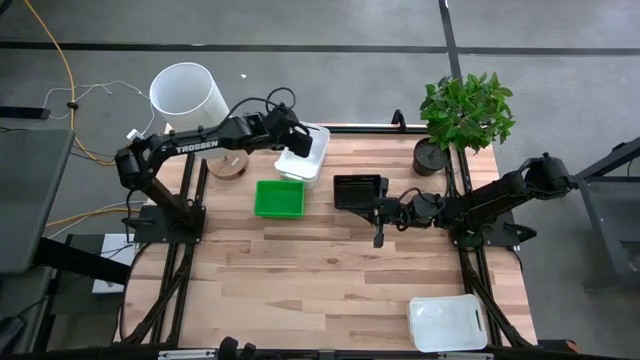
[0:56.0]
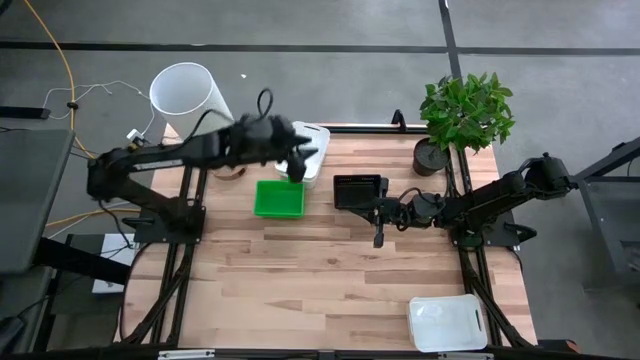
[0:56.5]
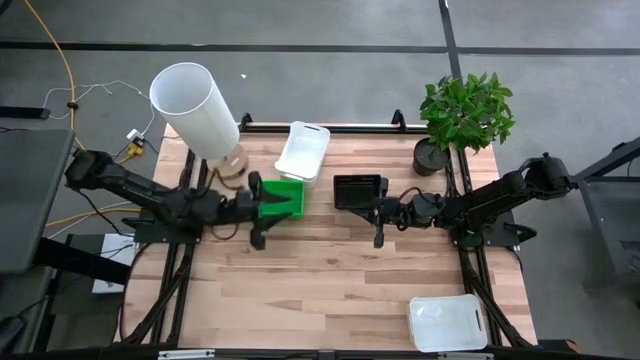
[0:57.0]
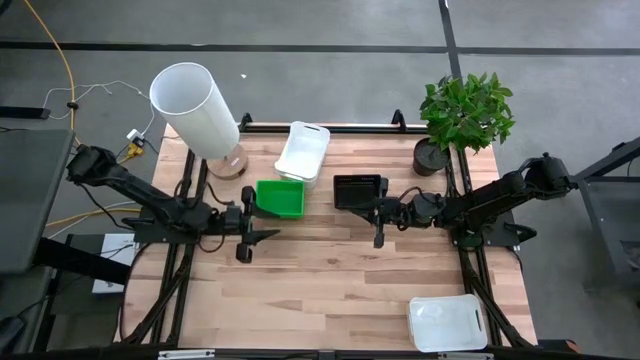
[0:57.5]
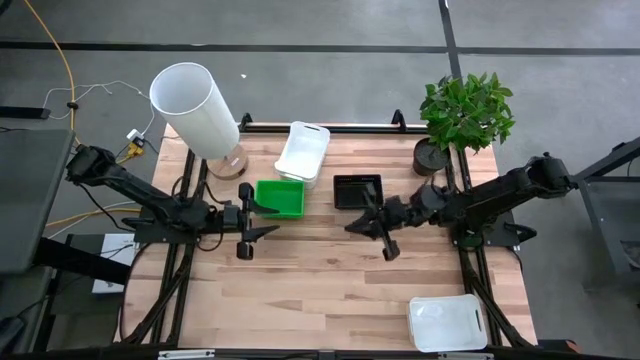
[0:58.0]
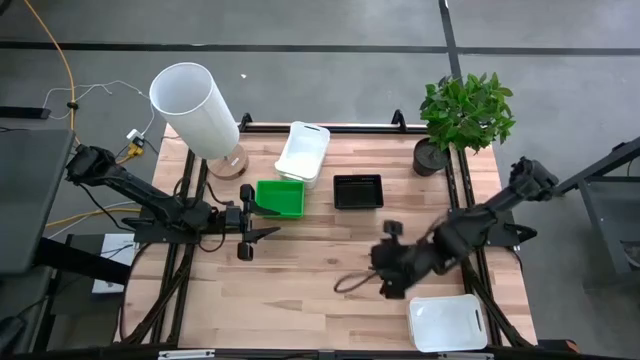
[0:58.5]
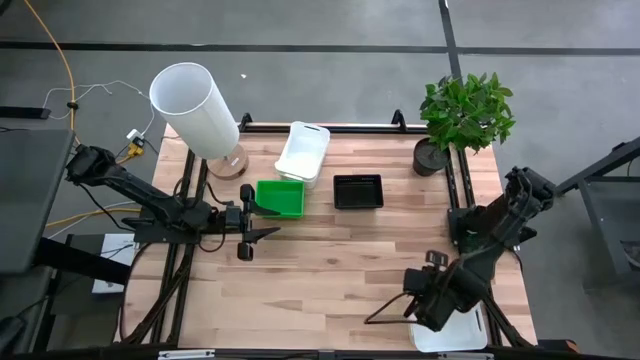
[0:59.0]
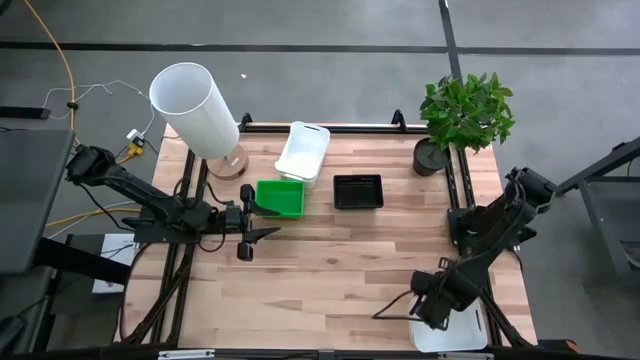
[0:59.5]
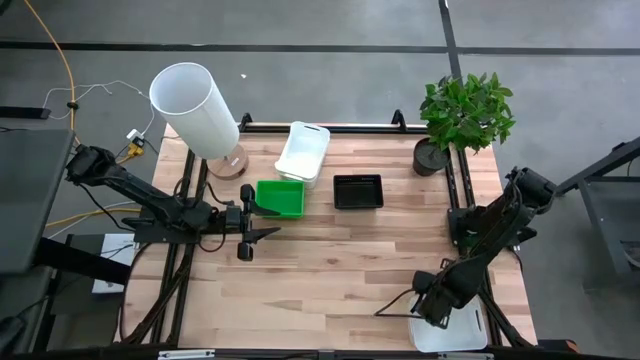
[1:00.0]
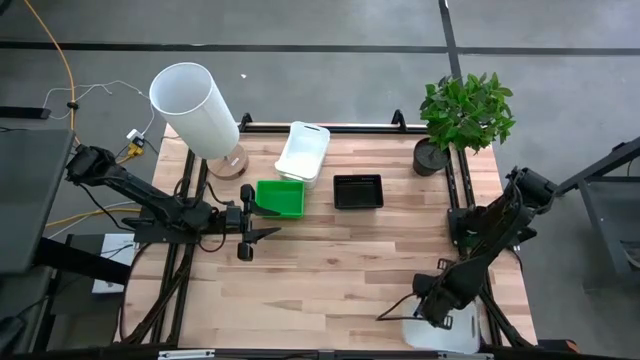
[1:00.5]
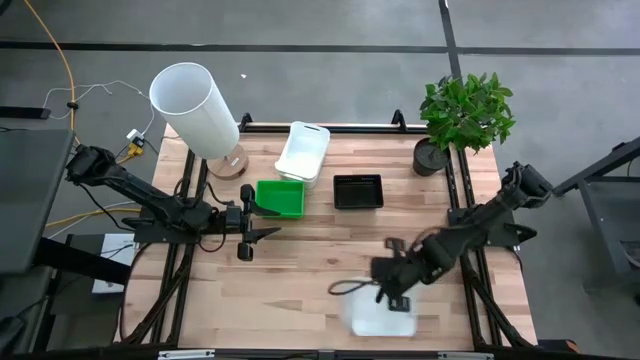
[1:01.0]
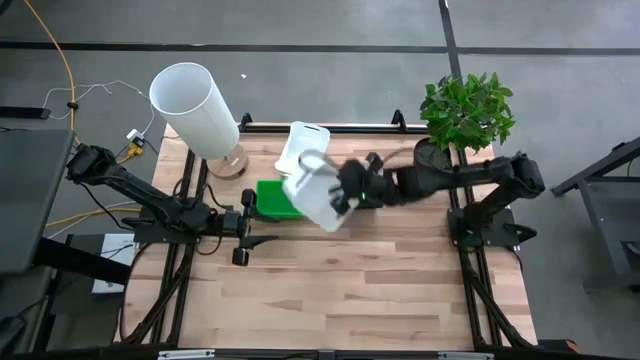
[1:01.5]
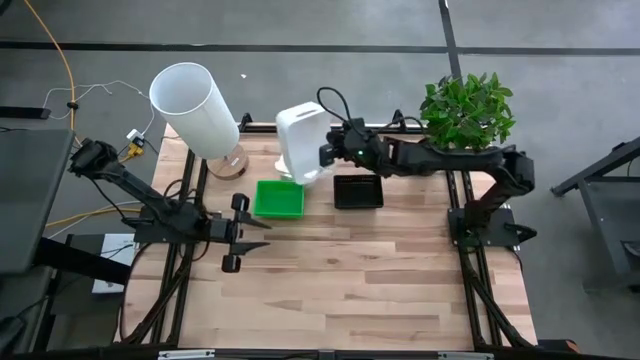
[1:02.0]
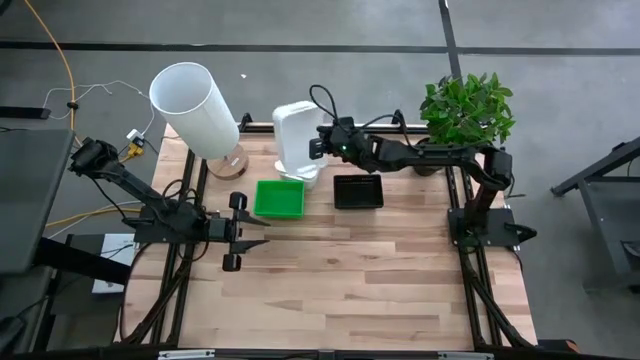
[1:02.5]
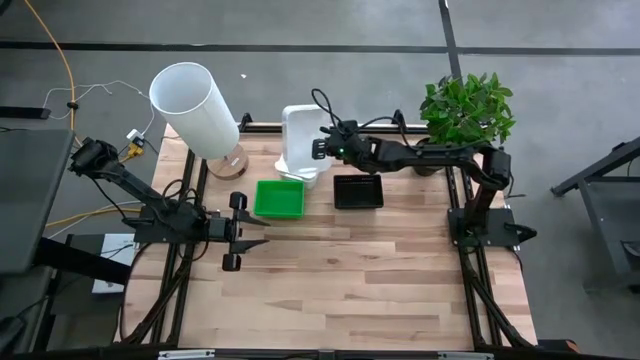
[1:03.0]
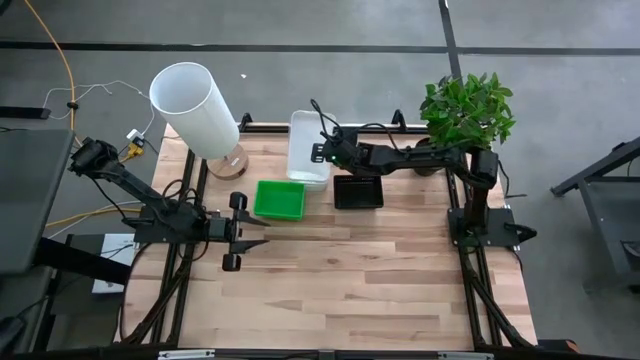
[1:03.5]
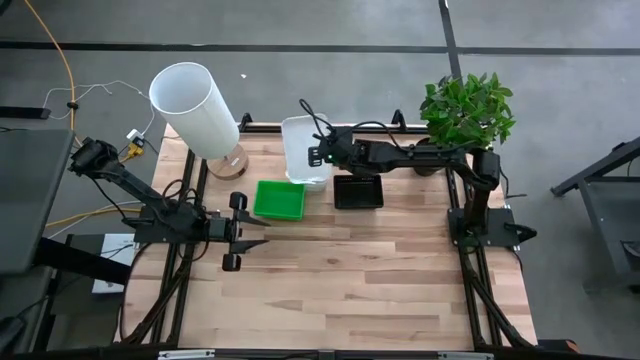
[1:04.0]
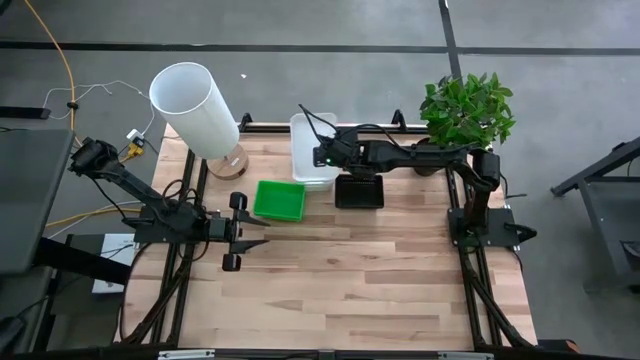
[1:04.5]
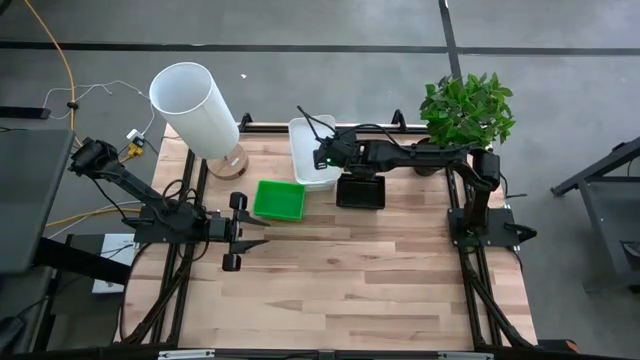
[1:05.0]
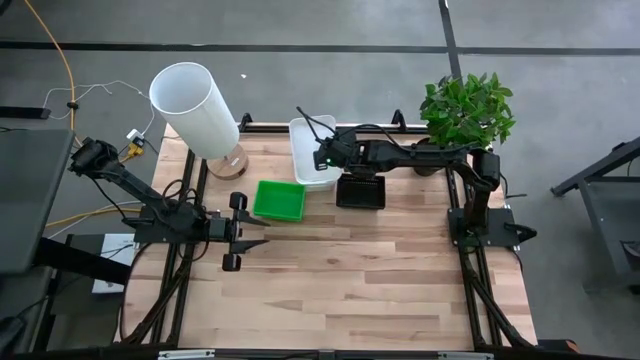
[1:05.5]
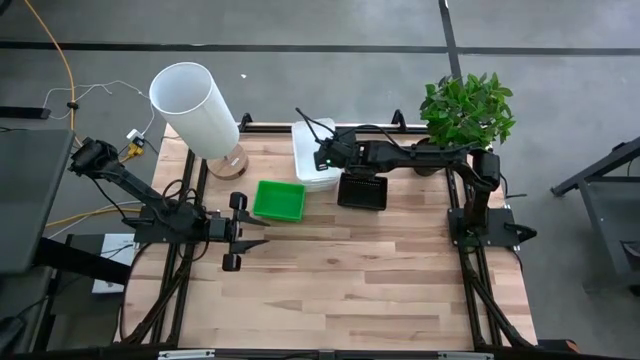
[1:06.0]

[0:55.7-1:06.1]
Stack the bottom white bin on the white bin

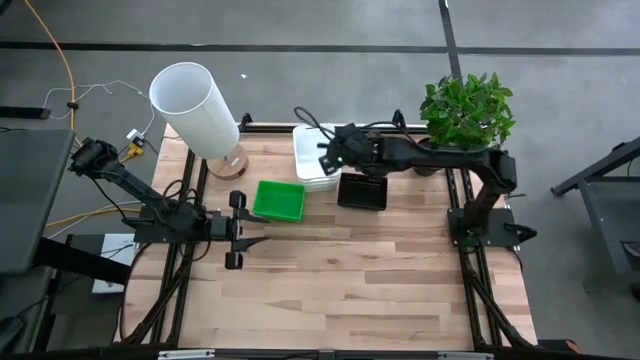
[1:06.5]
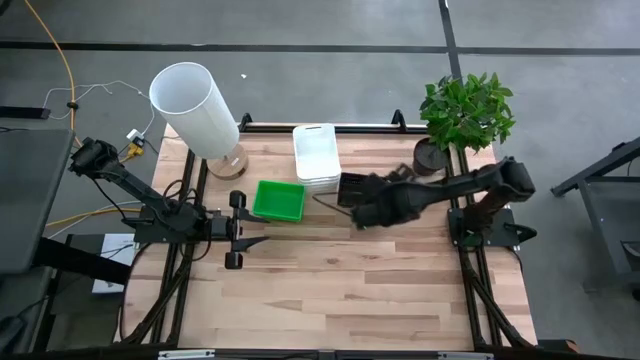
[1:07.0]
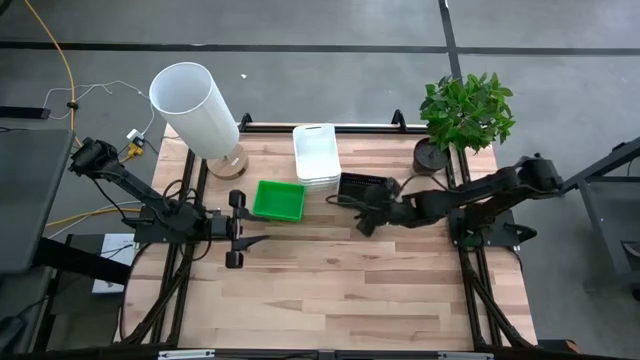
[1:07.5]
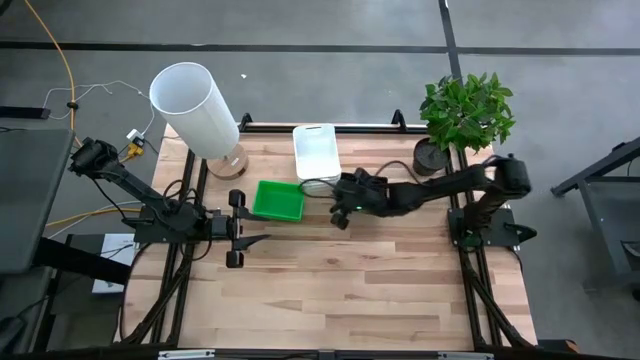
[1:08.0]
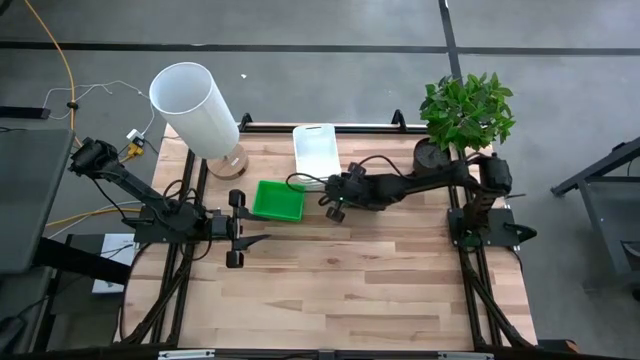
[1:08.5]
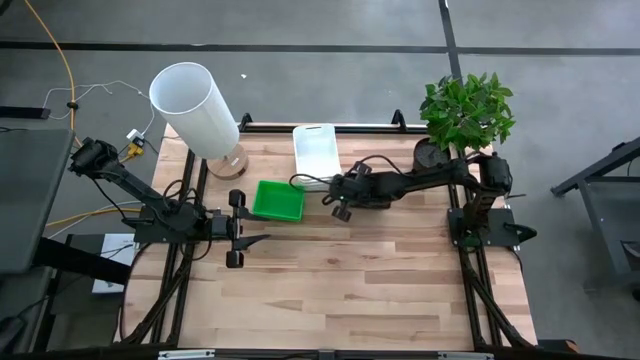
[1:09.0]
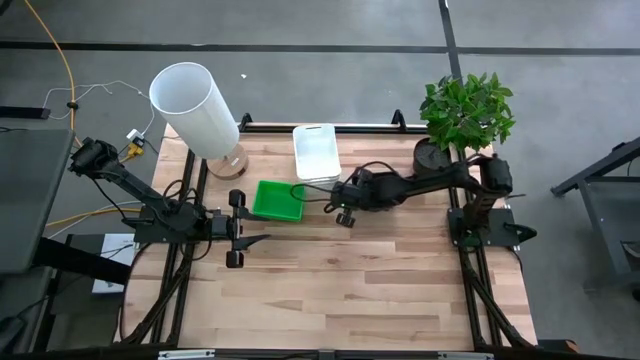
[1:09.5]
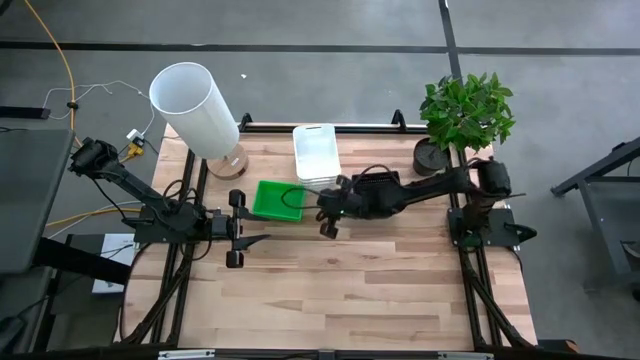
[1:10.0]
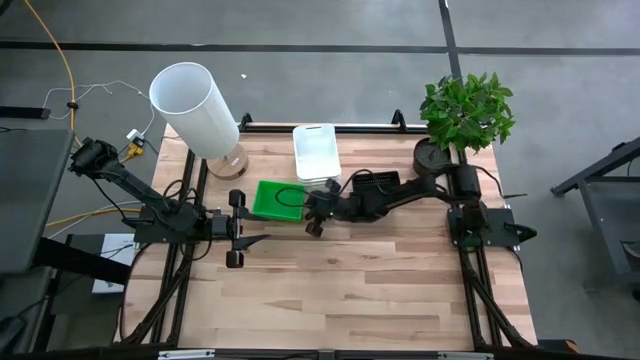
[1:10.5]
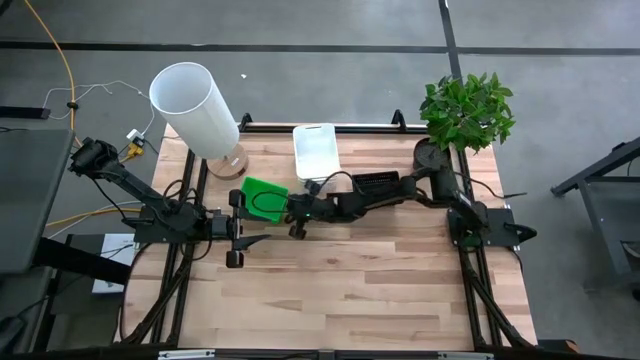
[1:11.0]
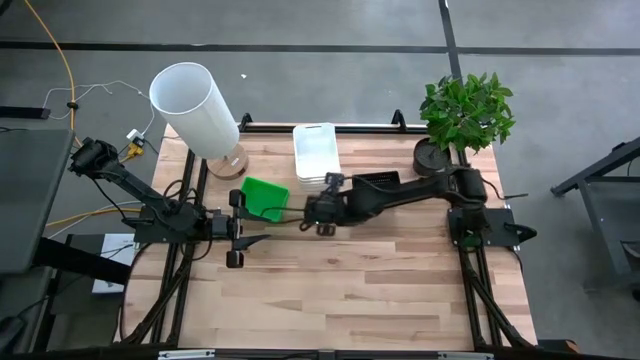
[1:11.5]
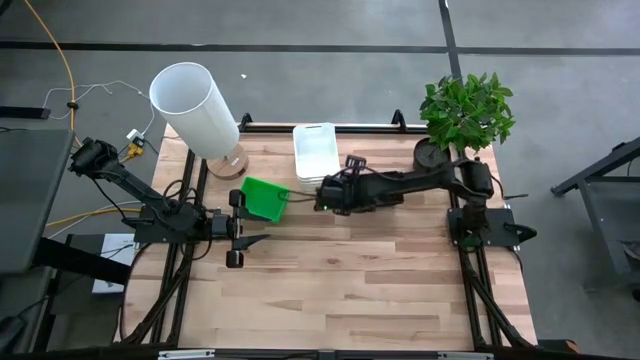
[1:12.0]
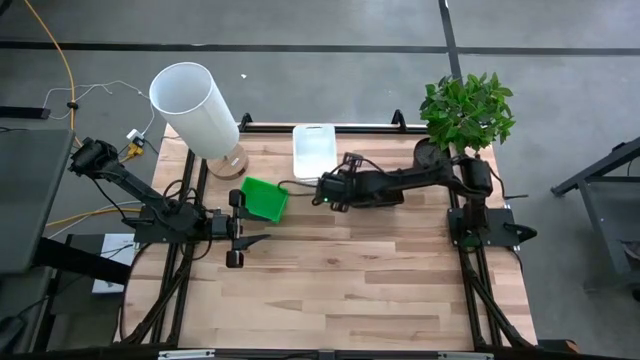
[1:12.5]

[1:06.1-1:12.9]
Adjust the bin
